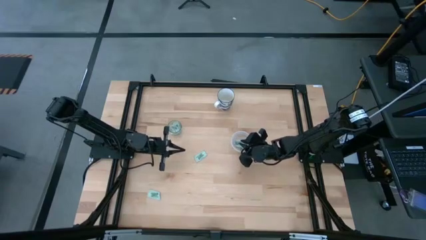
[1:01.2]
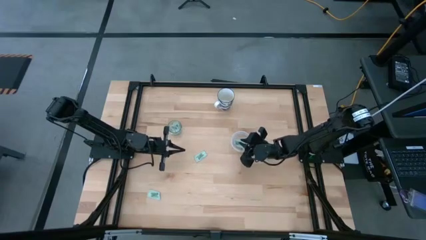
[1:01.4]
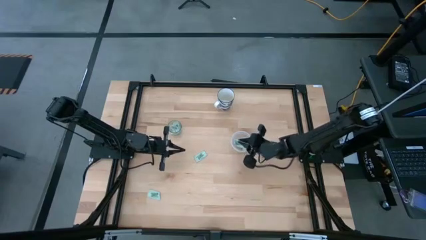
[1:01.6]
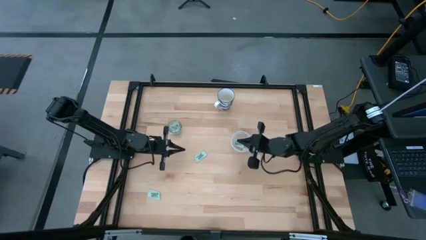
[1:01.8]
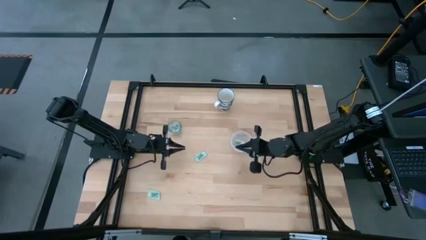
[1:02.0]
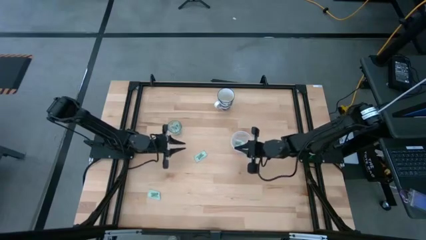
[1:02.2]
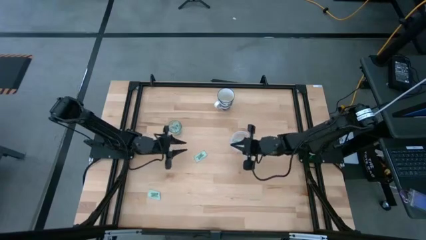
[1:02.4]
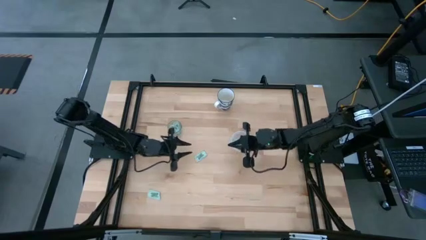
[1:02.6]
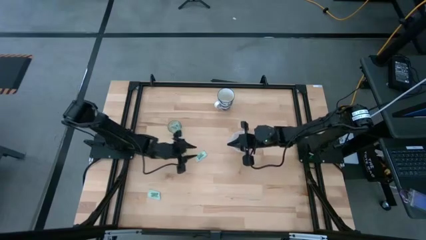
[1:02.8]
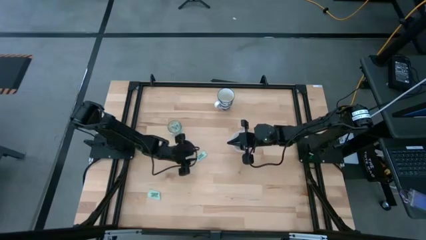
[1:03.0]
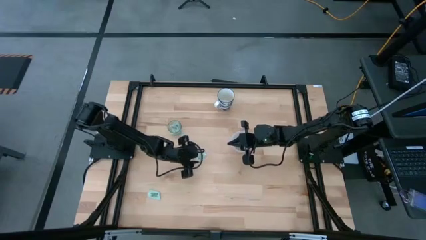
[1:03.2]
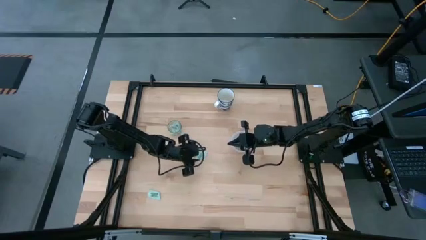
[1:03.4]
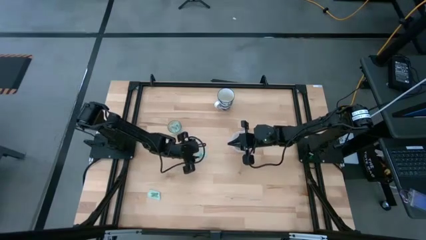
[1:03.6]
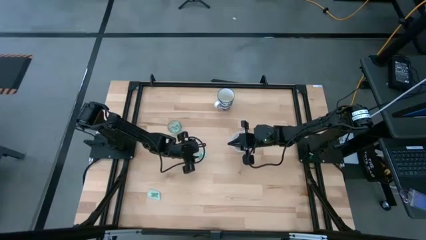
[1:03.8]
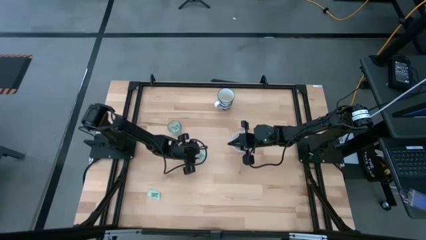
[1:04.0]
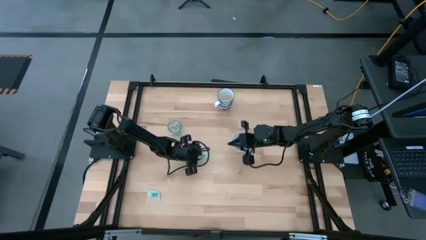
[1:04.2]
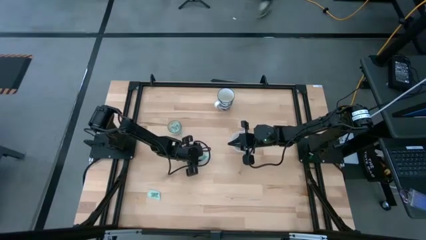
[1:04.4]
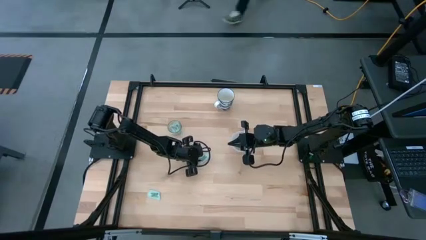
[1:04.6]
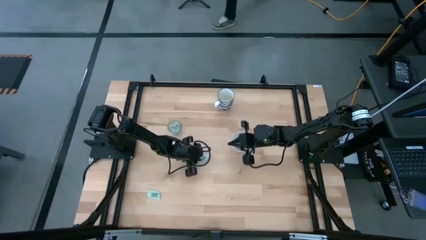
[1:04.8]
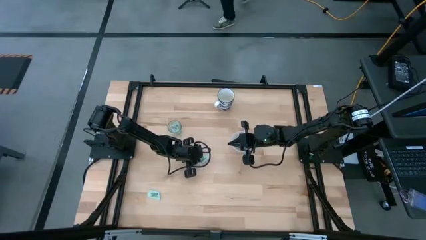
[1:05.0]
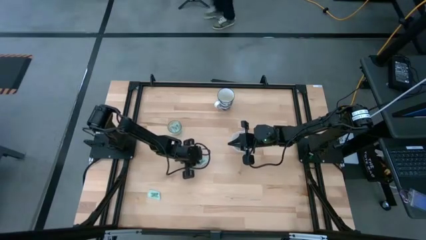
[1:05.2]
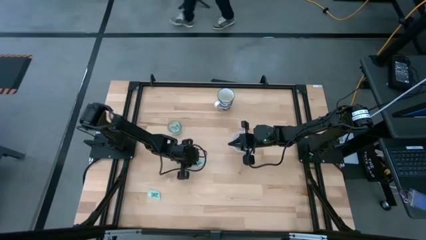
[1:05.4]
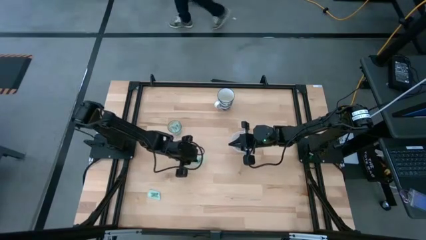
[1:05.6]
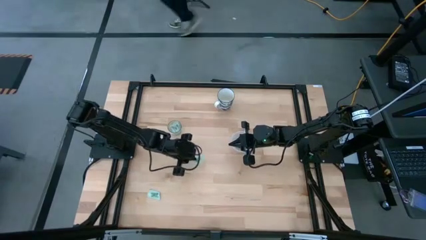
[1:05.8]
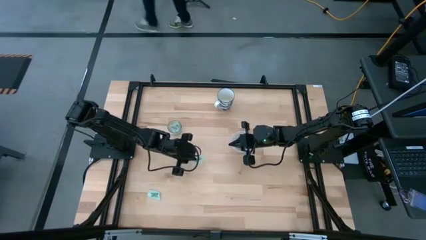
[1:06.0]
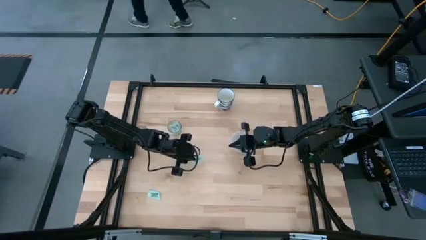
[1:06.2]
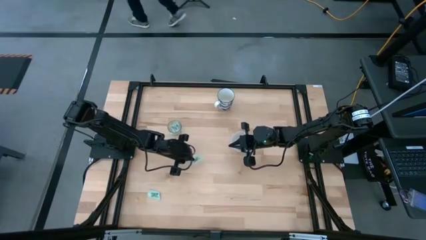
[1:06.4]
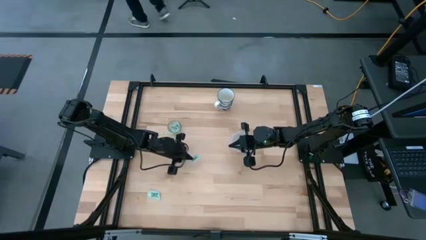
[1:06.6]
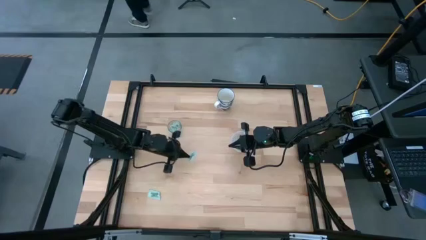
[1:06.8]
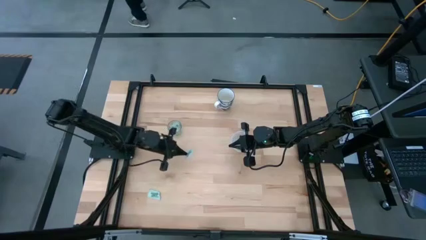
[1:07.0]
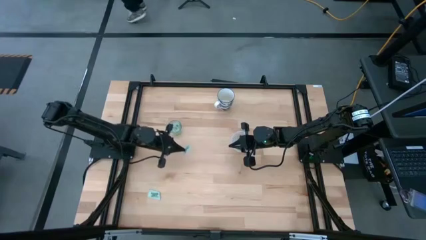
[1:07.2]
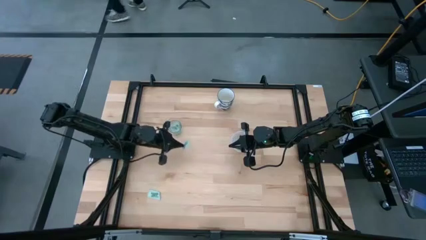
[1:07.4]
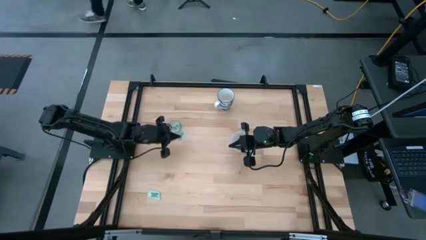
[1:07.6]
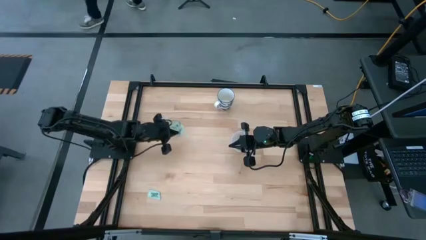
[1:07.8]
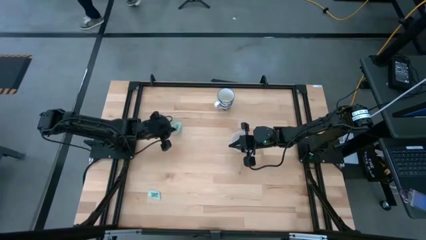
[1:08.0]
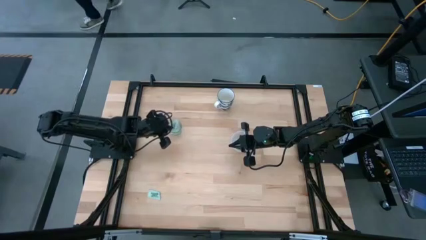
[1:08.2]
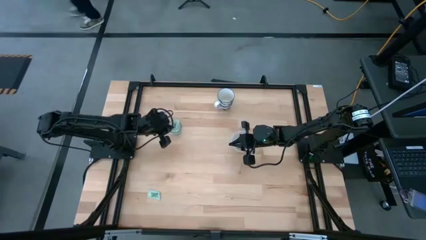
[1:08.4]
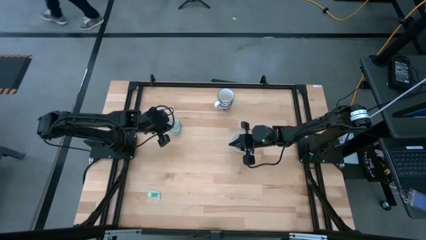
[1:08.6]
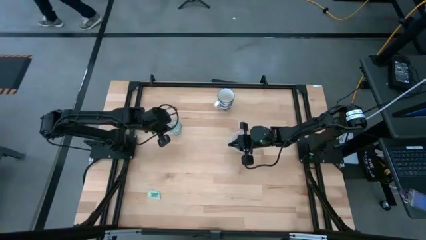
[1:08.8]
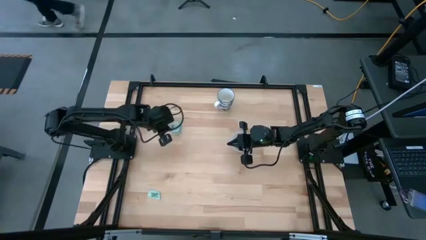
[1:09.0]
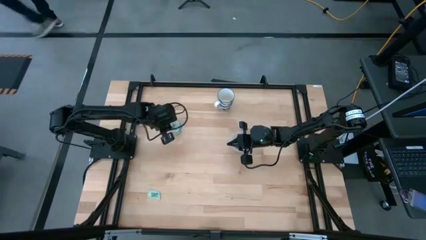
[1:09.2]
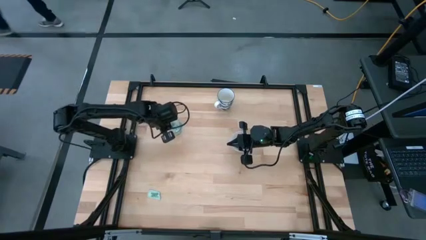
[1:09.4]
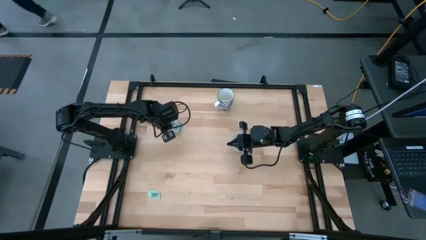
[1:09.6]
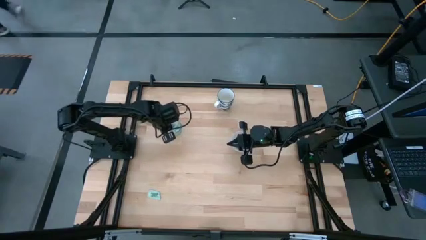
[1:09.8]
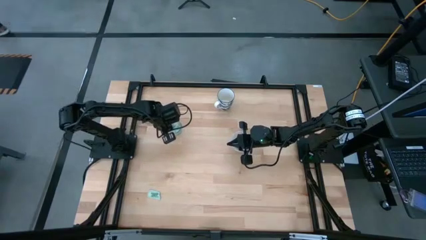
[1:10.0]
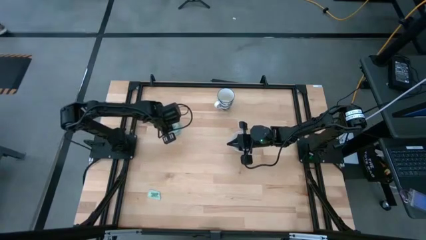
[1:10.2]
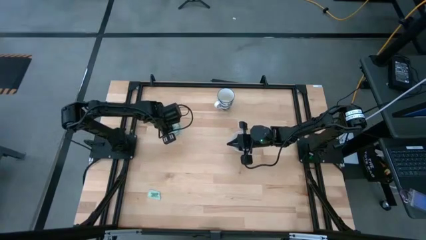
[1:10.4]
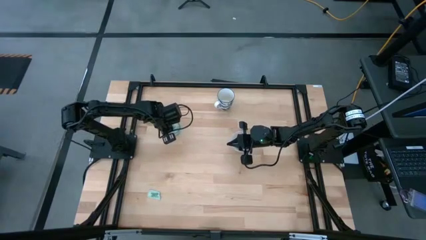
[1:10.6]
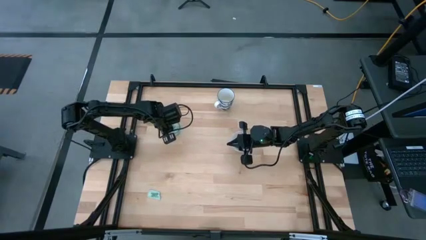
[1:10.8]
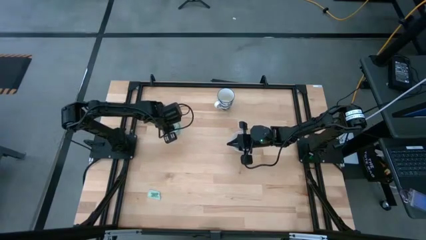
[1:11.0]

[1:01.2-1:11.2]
Task: Pick and place Stevia / Truvia into bins
Put the stevia packet into the transparent cup

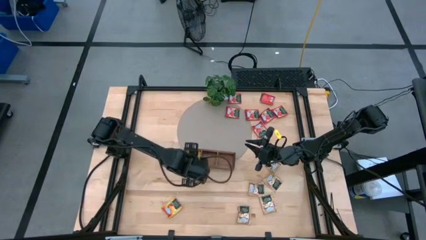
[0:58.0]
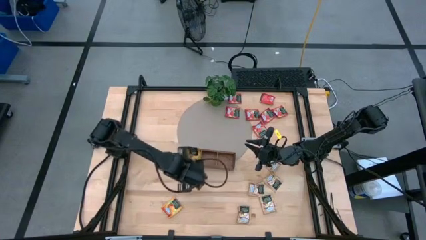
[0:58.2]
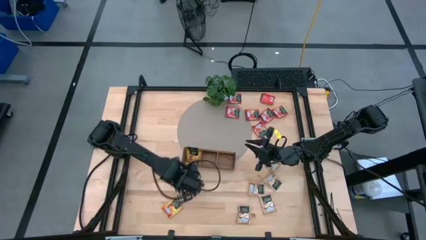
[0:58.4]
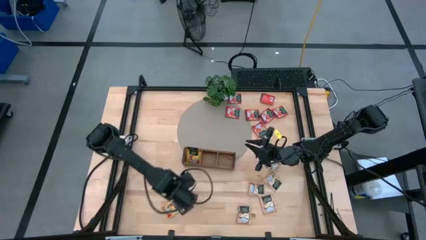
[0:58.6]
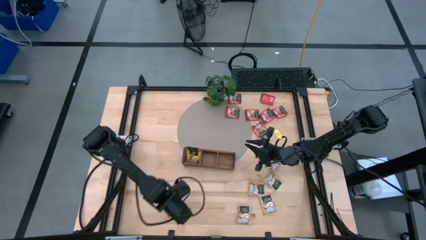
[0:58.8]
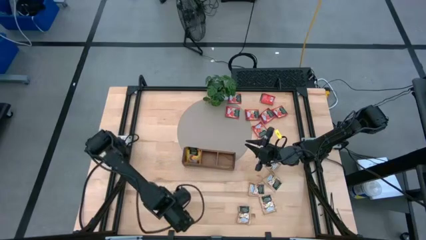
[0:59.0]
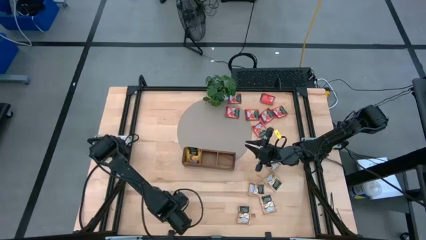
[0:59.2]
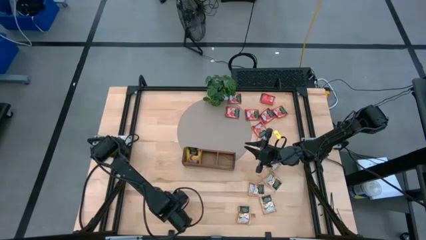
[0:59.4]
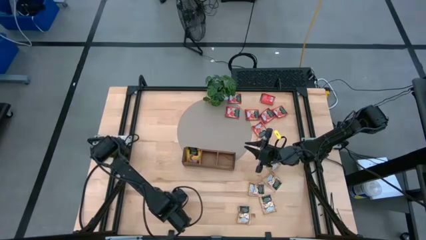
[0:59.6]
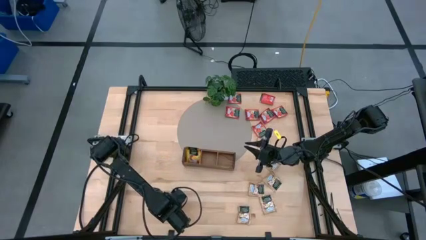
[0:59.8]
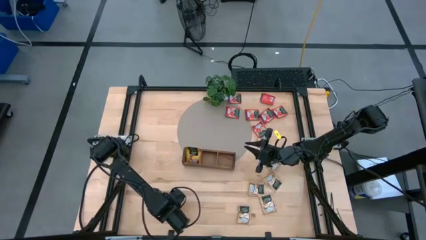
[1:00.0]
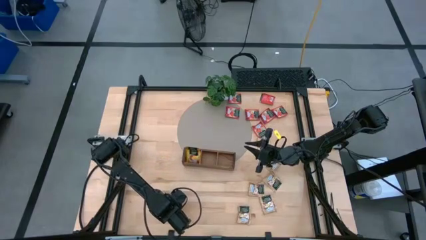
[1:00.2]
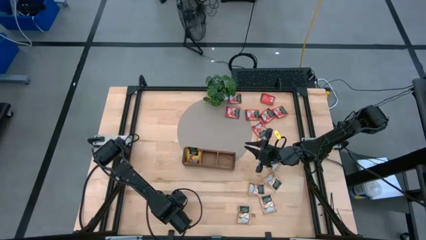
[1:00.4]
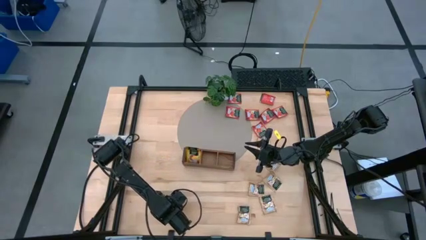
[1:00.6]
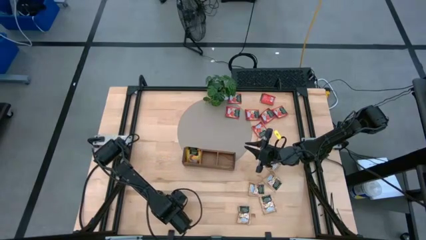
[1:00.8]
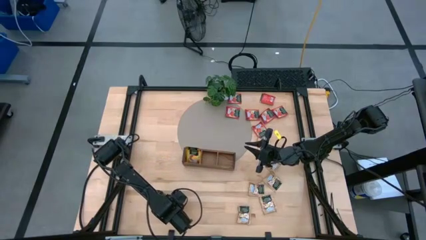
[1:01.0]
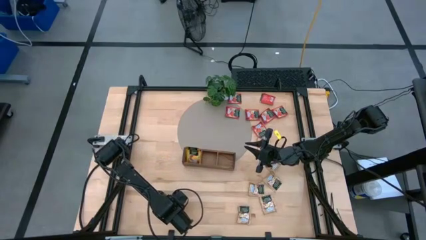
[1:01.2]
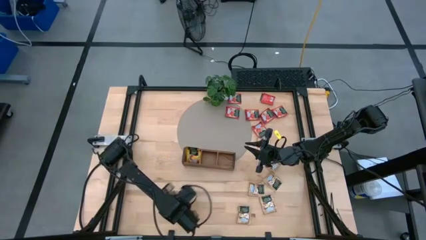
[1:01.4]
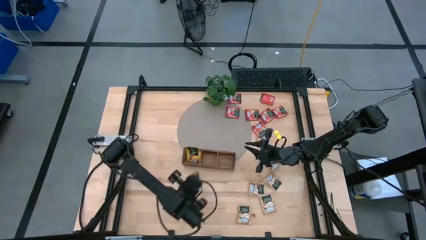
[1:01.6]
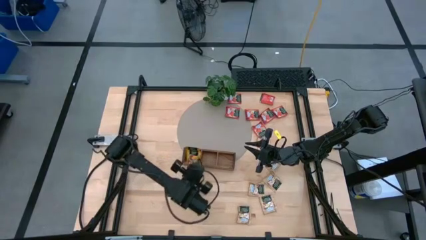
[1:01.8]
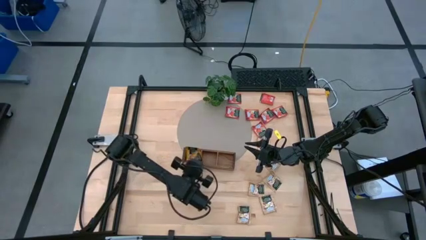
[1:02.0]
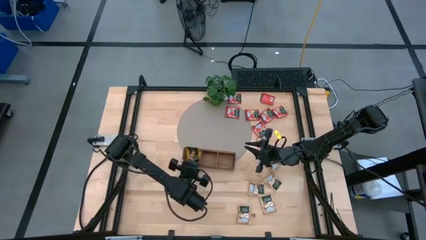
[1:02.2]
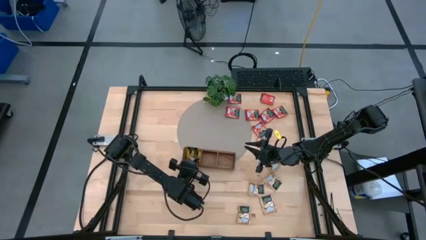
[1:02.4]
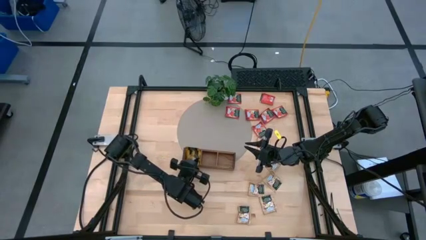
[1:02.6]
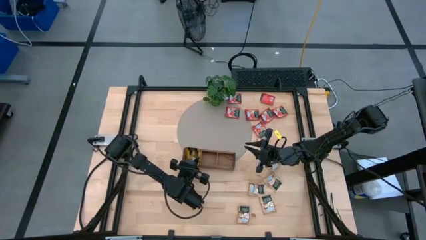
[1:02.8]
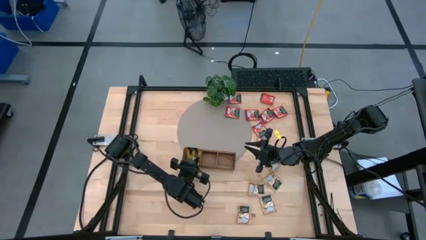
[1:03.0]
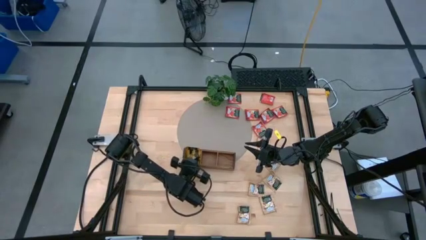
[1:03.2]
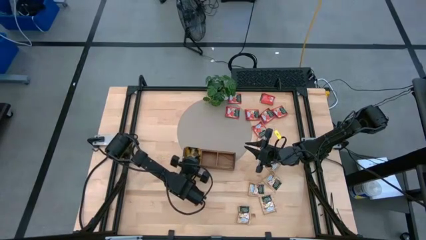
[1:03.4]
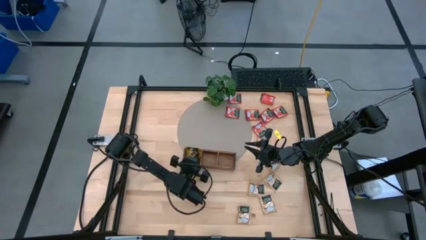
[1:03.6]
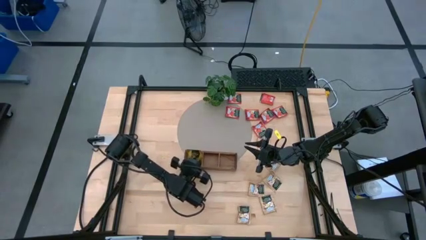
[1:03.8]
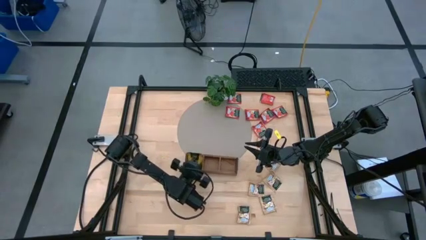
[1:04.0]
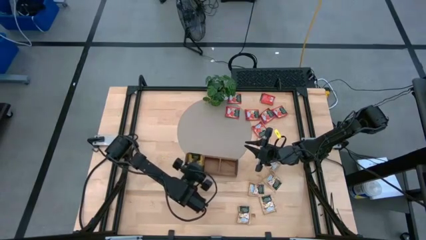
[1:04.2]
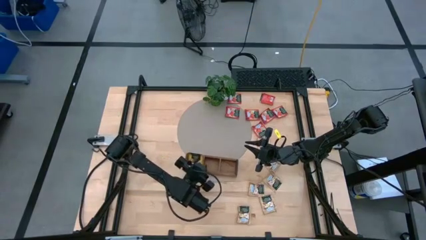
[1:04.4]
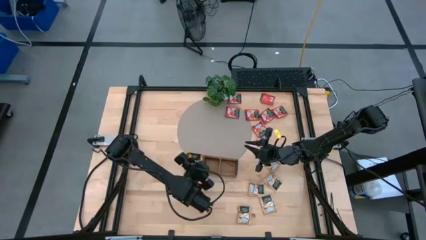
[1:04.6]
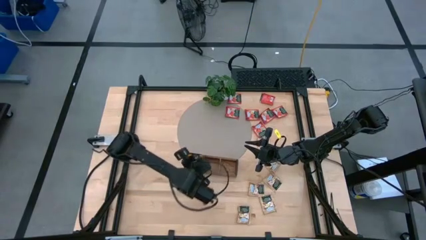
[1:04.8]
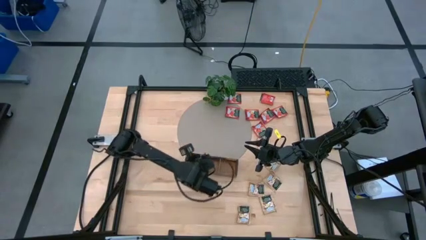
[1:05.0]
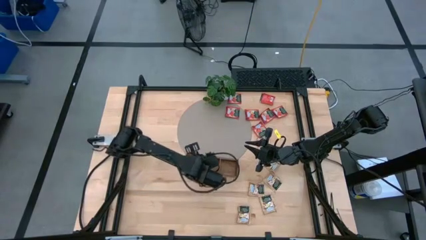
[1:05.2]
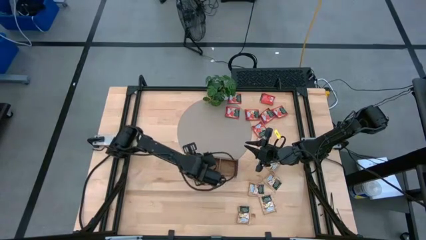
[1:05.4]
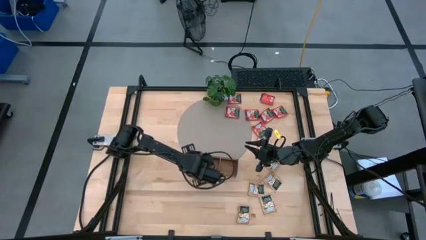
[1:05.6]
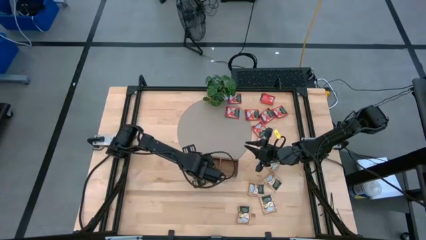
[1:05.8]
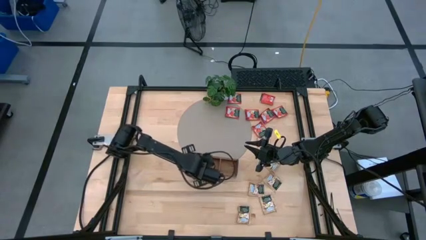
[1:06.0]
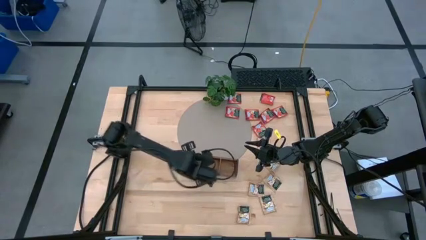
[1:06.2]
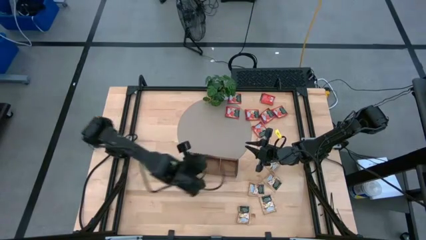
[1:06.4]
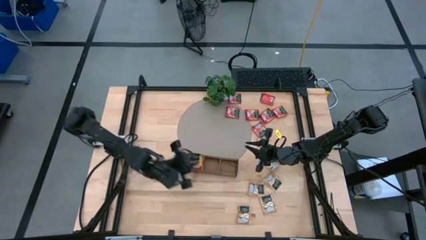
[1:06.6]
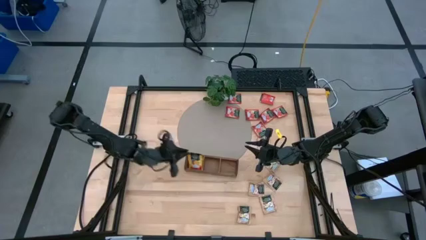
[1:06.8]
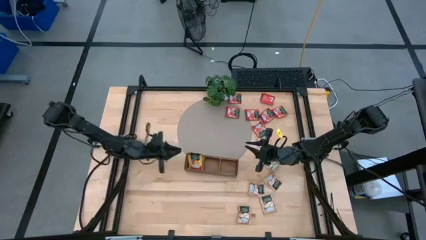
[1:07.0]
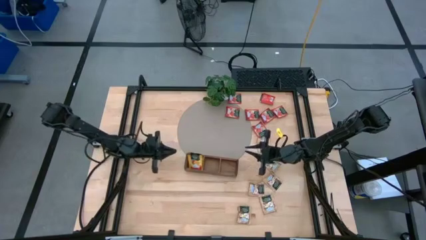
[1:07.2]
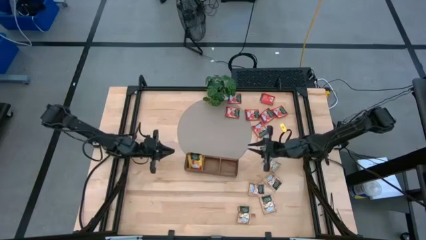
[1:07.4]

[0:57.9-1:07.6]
Task: Pick & Place Tea
Put the orange tea bag into the left slot of the wooden organizer
